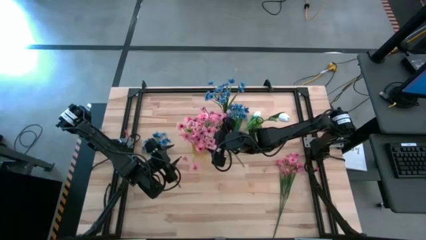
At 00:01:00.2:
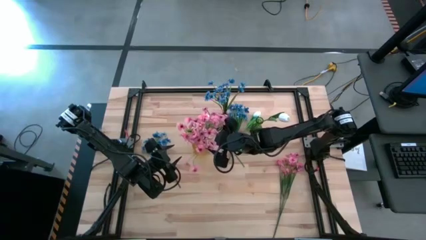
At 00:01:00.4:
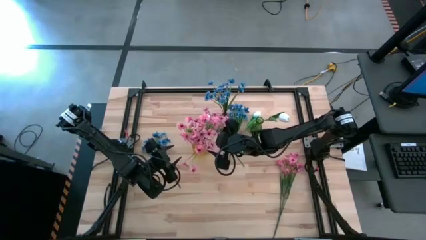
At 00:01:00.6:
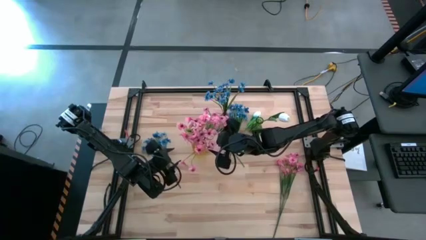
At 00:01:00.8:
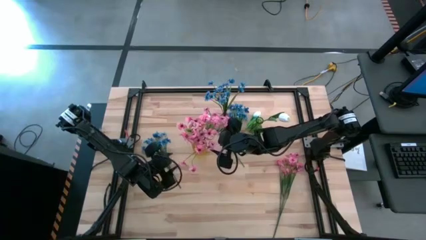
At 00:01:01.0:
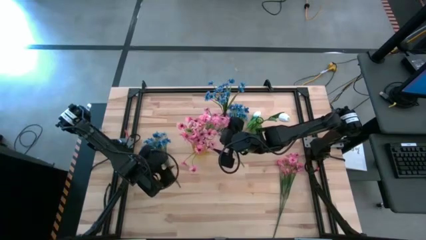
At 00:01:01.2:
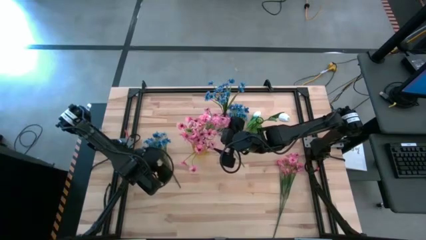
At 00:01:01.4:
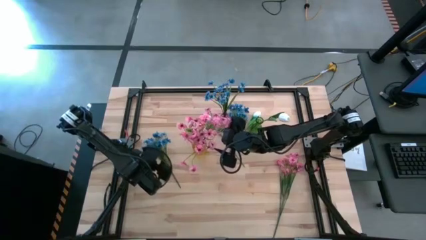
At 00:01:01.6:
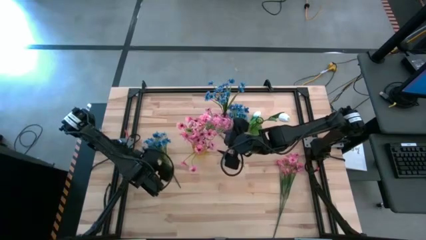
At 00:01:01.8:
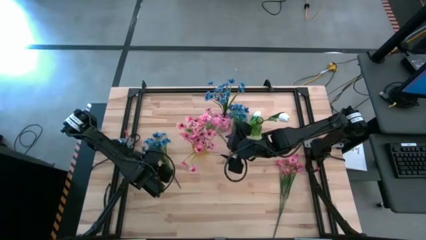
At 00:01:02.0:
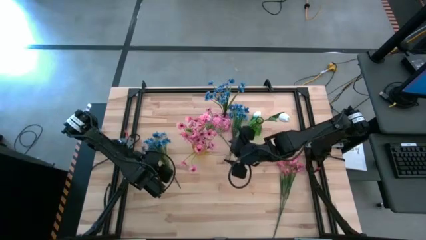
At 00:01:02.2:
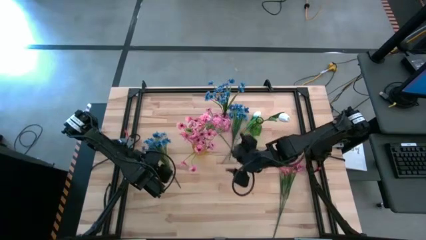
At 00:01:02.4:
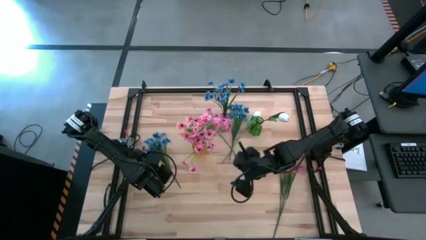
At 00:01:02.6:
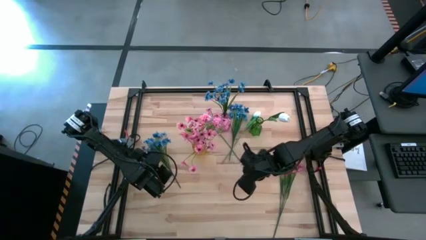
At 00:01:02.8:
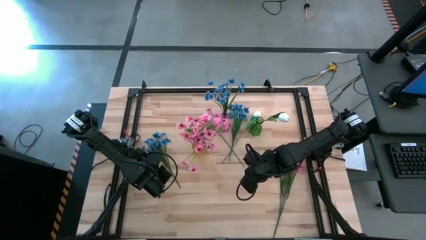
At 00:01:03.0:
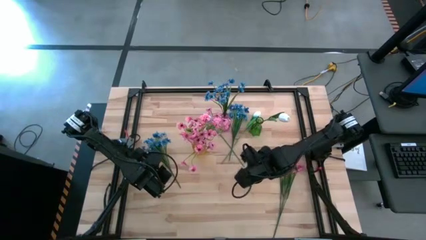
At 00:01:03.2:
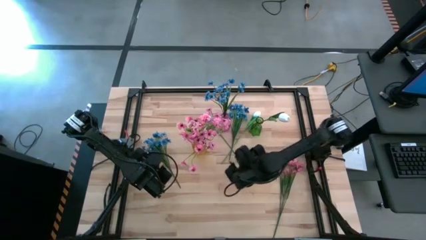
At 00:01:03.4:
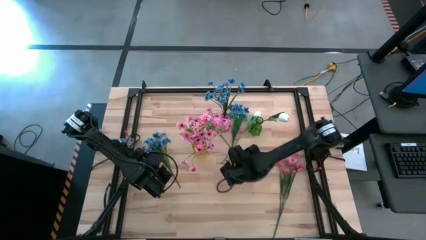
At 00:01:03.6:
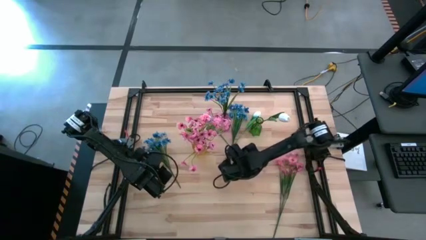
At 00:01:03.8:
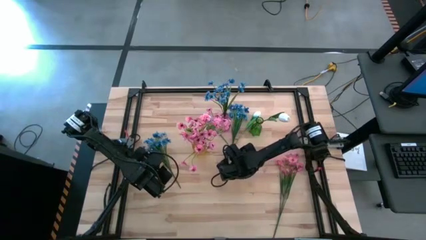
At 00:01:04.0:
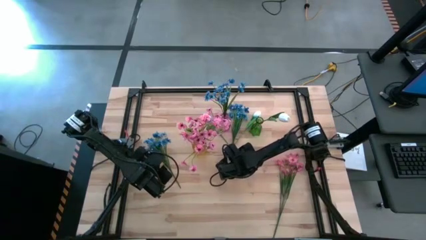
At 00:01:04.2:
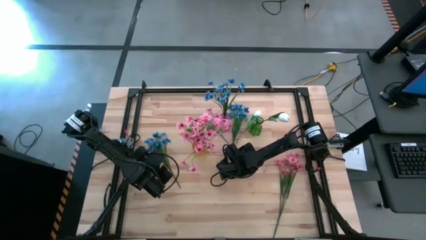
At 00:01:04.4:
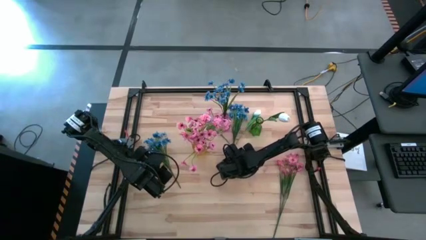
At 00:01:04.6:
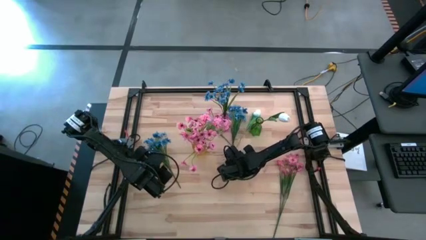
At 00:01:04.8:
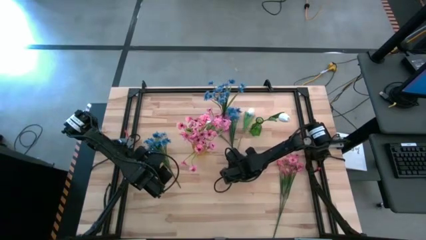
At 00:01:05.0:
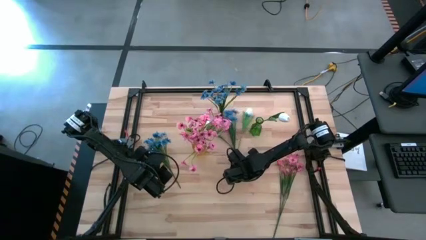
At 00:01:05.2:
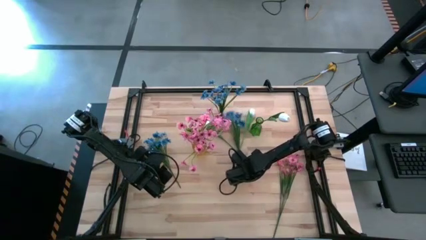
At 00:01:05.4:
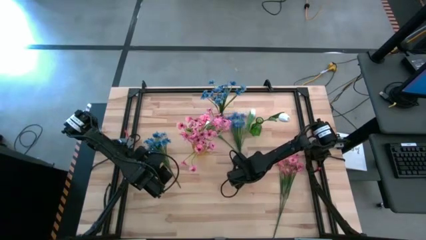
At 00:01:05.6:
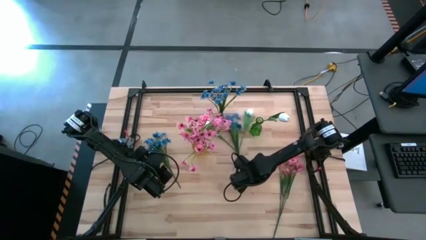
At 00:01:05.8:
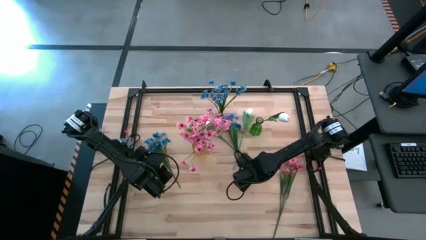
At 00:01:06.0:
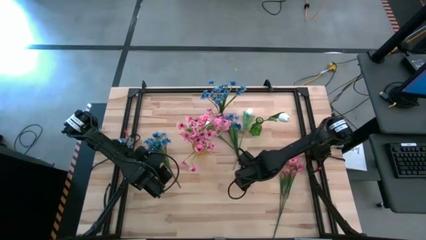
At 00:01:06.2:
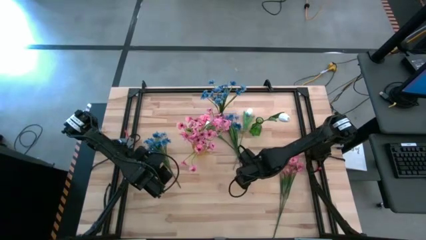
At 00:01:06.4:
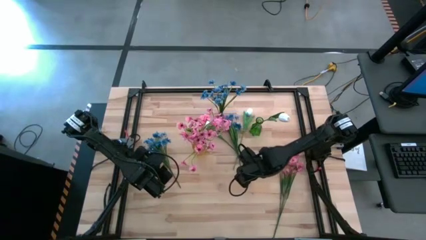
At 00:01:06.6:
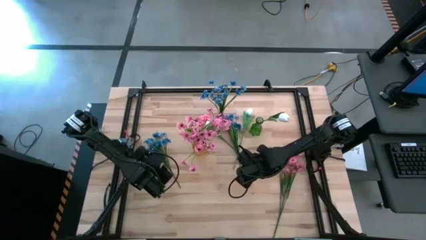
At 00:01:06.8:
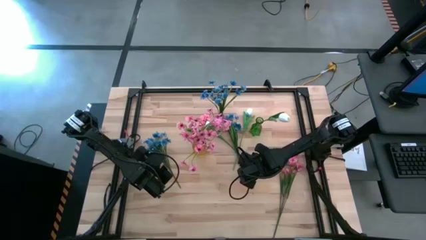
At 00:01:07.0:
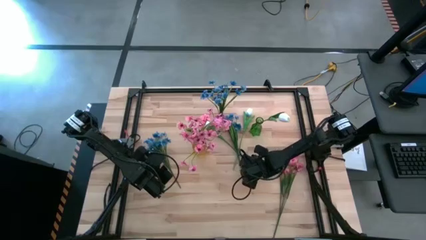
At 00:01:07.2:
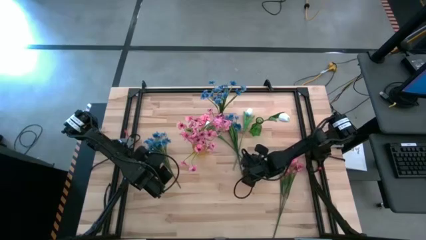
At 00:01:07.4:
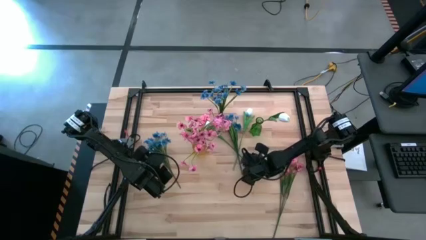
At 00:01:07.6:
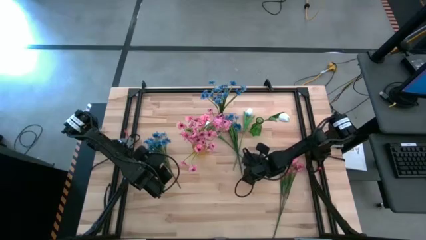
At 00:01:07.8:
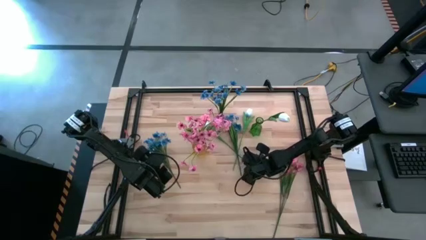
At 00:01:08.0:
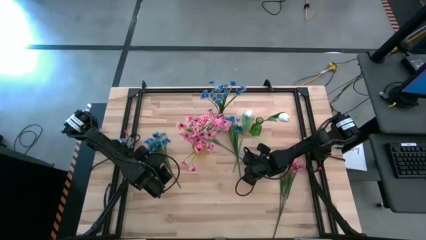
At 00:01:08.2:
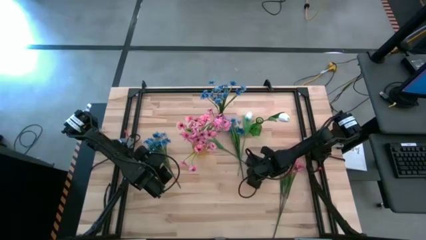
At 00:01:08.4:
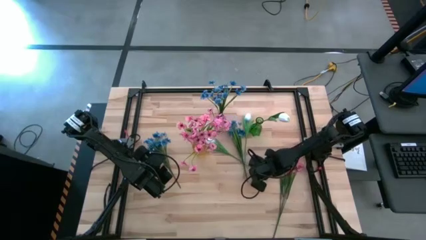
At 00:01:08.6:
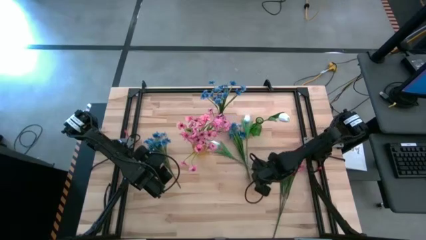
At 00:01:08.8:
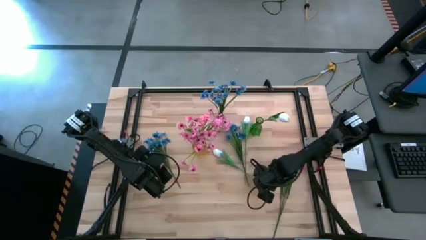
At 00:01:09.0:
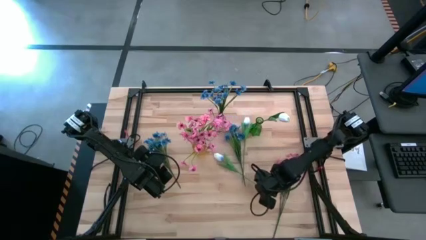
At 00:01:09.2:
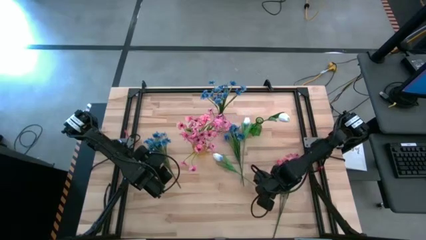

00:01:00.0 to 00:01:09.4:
Task: Sort flowers into vase by color
Put the left white flower into the green flower vase

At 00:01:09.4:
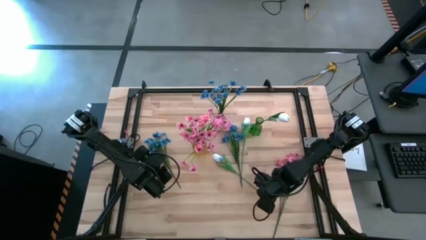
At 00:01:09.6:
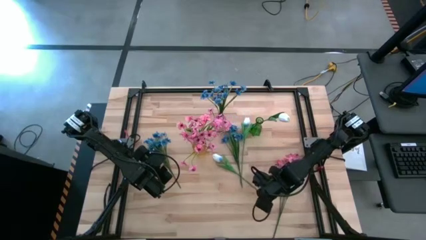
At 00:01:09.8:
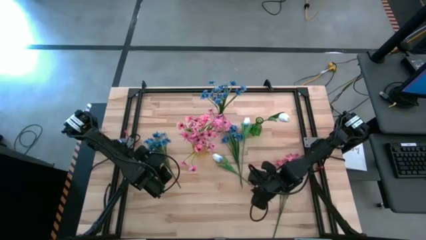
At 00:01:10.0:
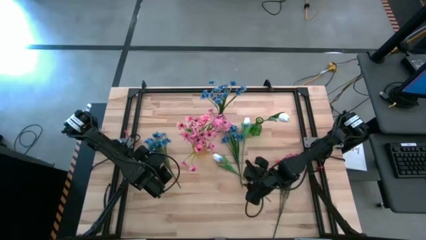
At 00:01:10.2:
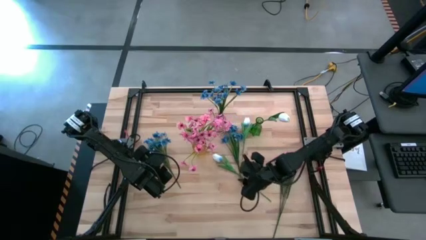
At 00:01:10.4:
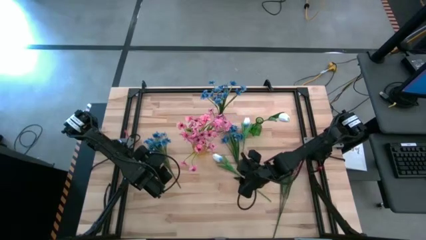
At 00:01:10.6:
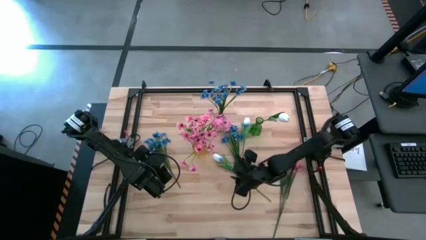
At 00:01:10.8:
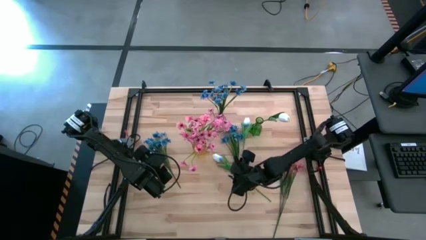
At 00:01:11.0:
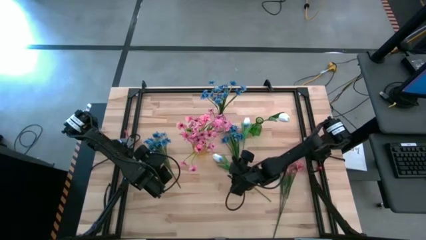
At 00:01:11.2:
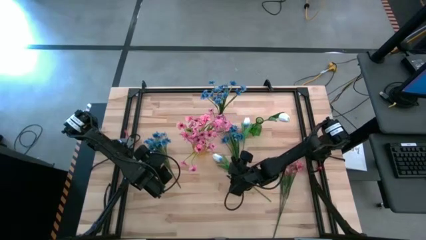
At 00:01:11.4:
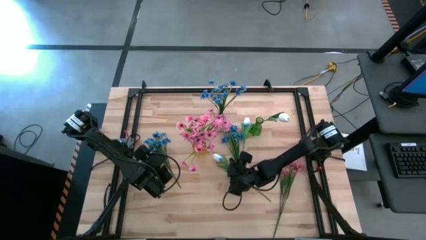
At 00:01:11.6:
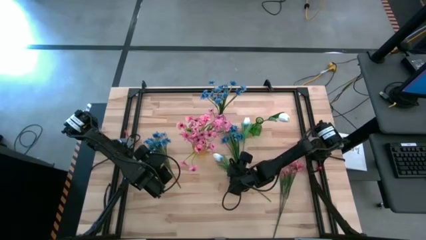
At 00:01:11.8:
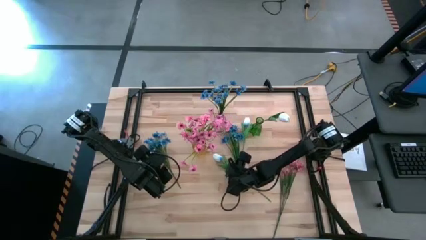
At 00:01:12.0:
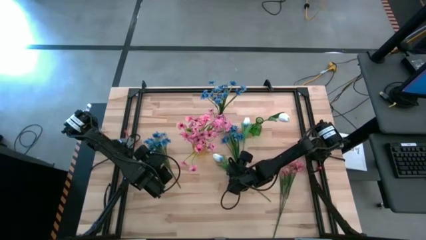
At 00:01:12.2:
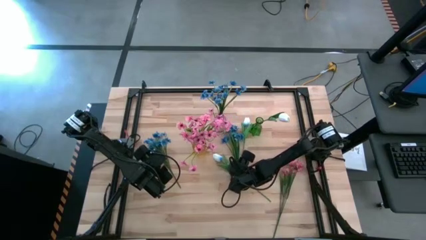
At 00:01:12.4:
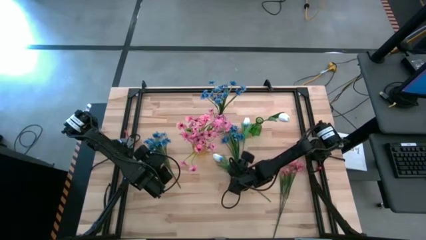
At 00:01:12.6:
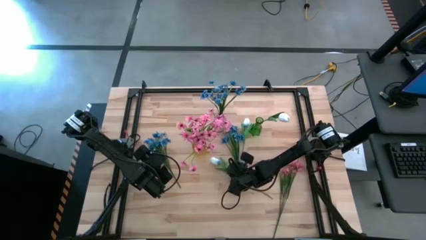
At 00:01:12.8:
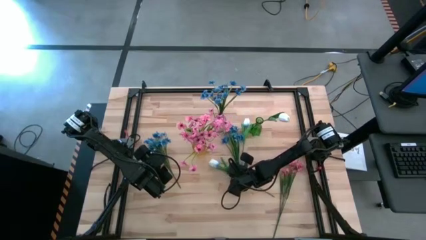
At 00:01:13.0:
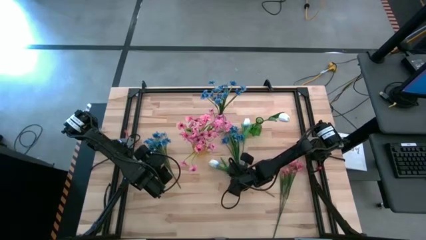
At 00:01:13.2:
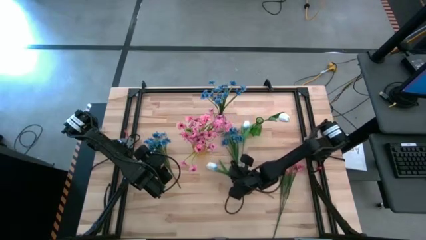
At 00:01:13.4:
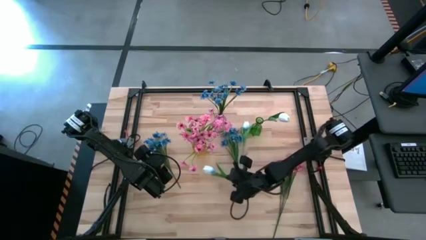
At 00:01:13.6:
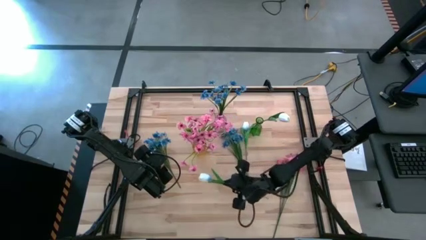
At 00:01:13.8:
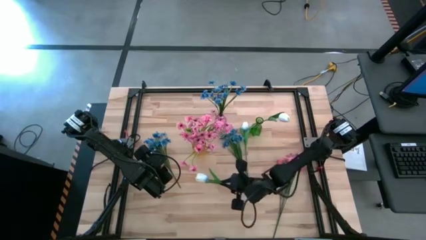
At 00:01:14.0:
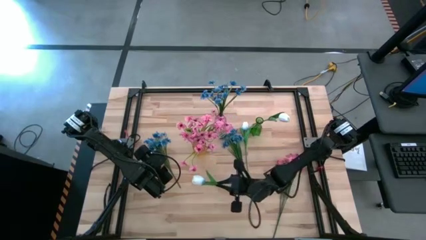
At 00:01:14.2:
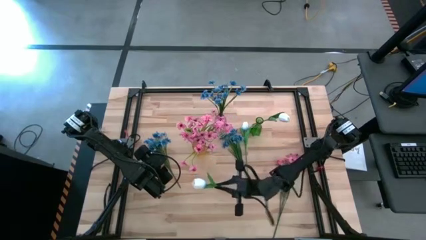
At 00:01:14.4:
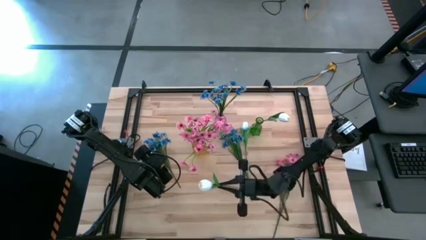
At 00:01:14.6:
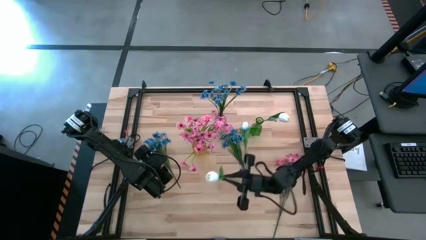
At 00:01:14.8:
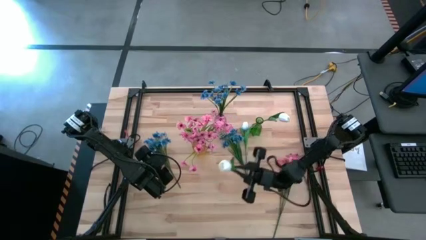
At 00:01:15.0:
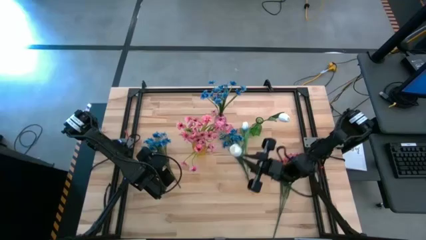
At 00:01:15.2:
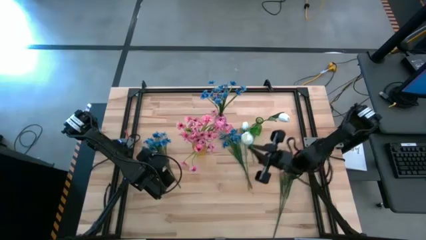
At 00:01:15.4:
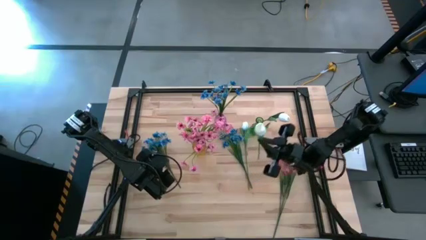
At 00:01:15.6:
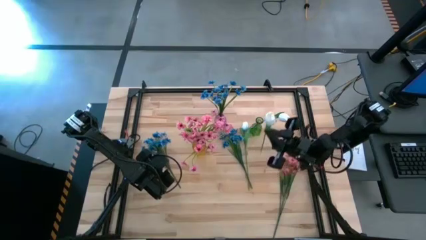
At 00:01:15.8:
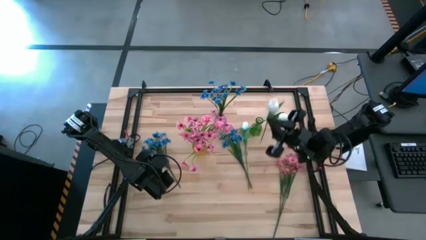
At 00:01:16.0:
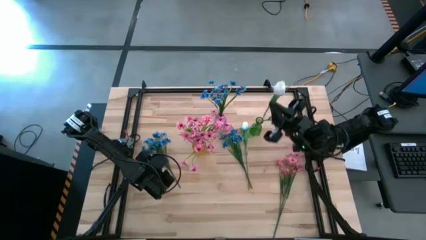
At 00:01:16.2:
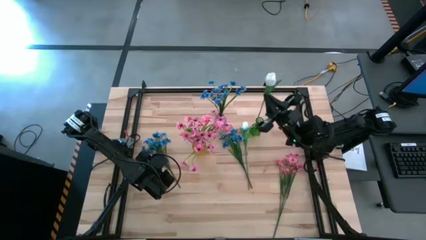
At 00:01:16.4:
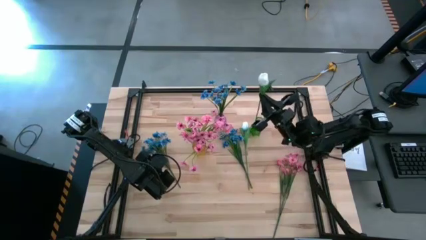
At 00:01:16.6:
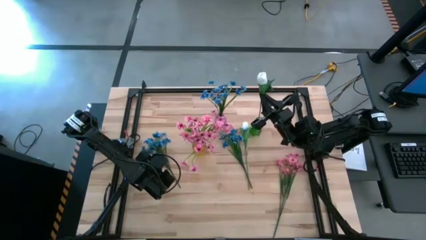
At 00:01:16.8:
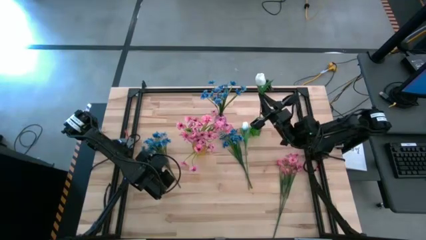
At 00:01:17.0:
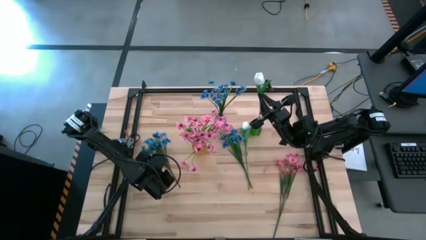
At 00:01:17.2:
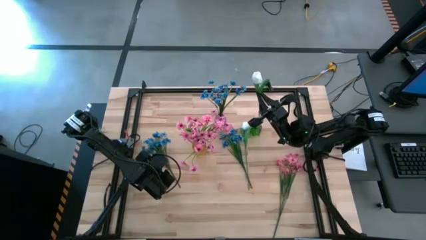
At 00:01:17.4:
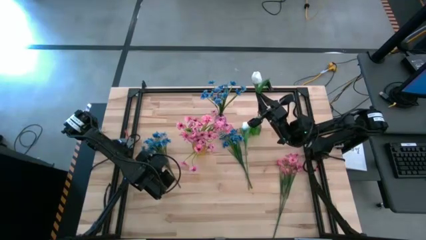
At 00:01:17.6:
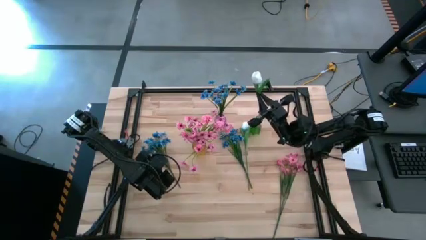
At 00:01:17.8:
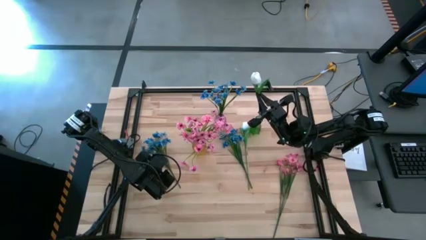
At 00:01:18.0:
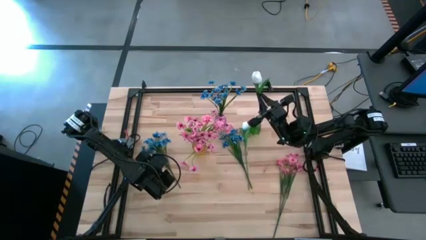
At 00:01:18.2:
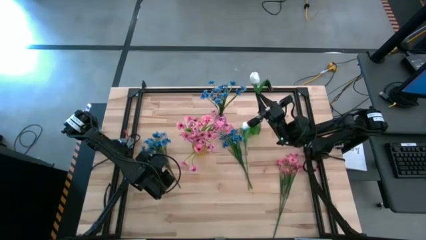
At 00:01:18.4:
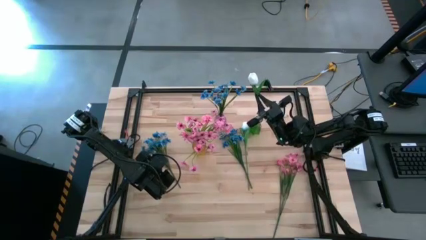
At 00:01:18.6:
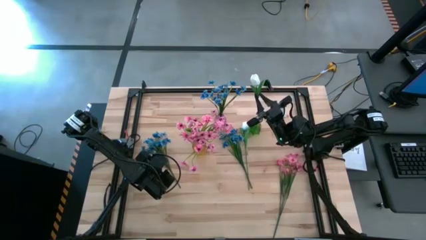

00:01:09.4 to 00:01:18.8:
Put the left white flower into the green flower vase
